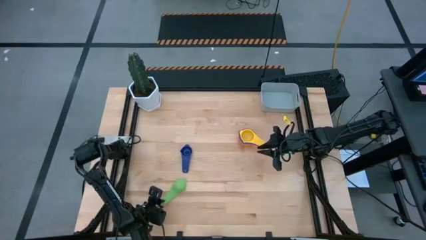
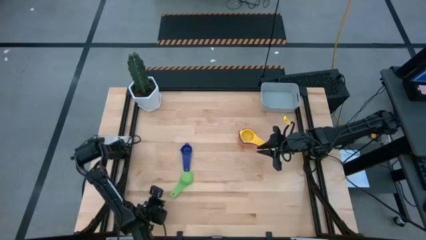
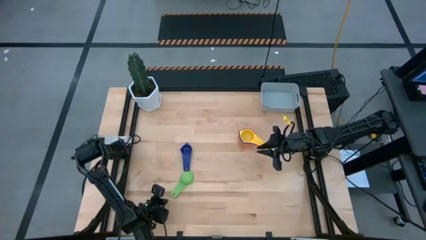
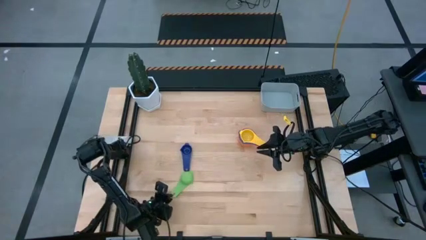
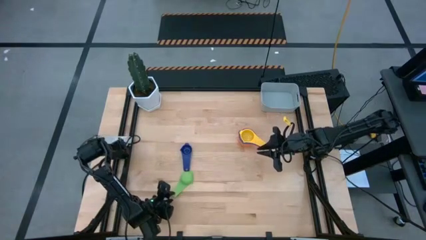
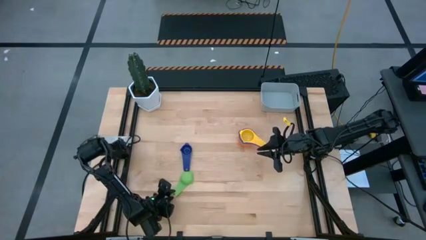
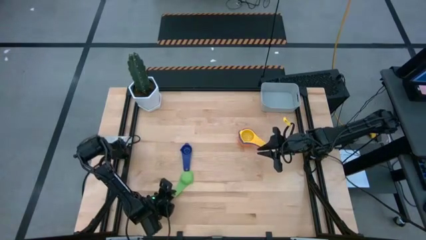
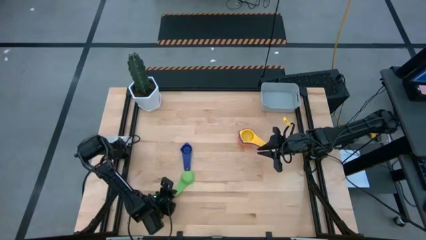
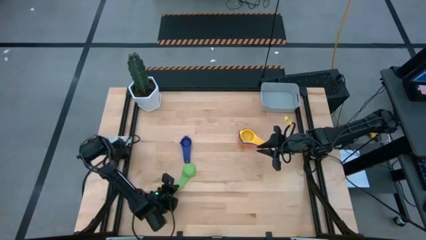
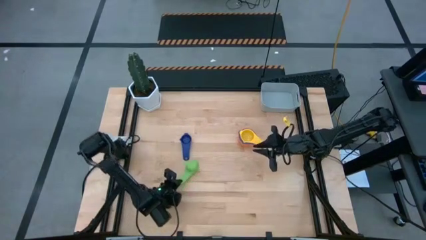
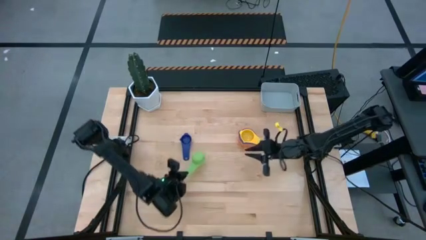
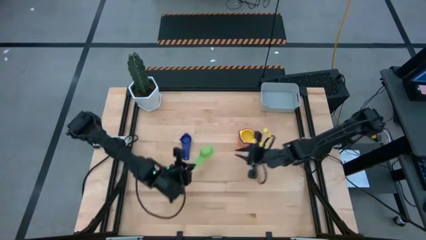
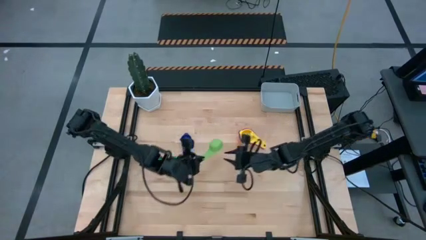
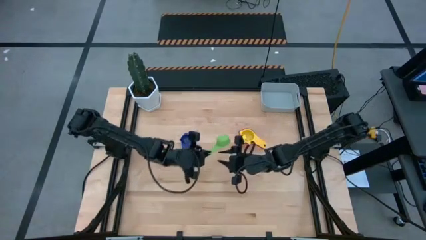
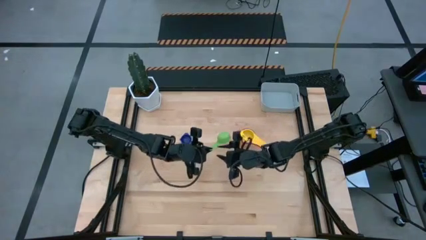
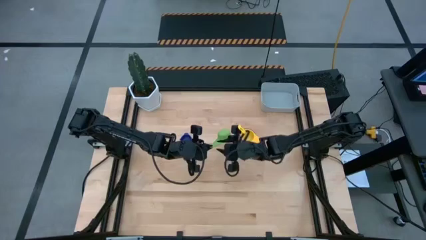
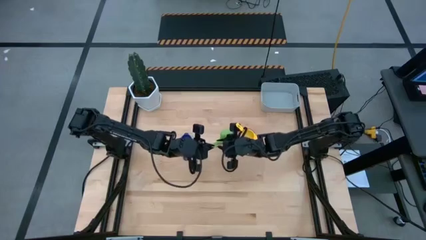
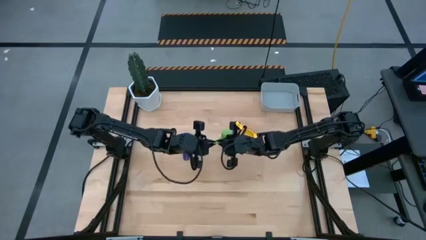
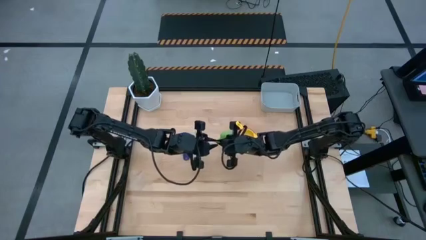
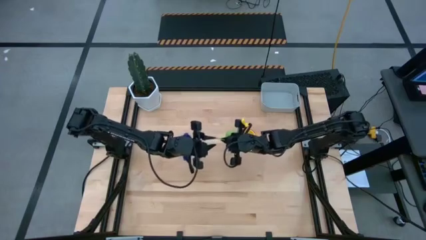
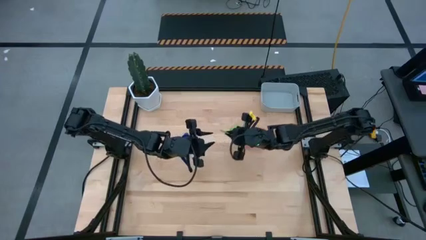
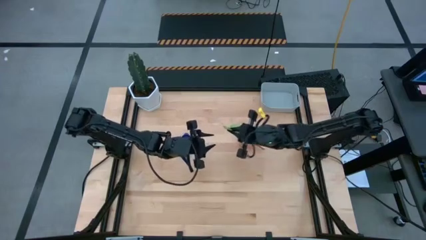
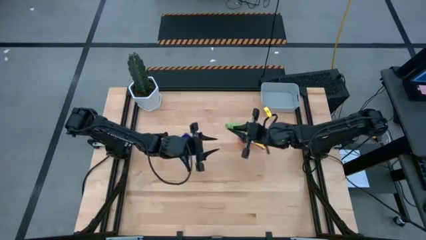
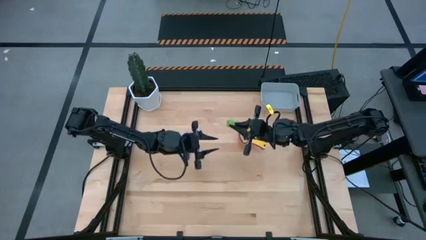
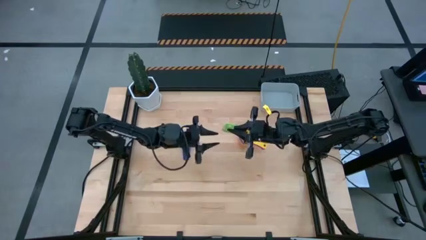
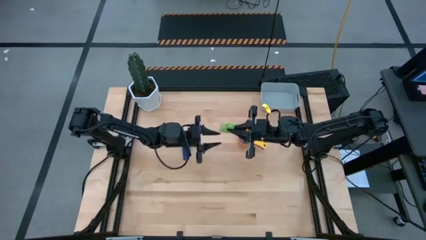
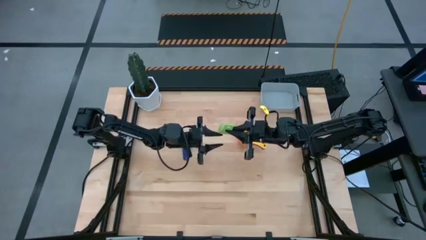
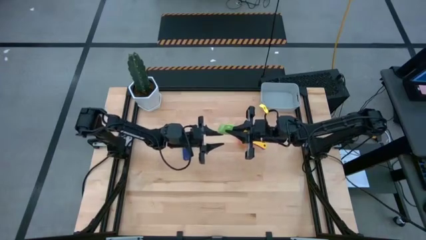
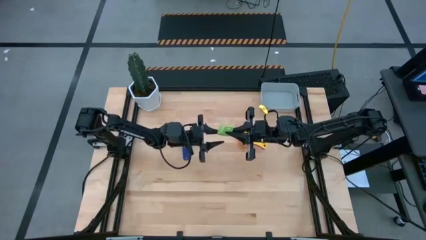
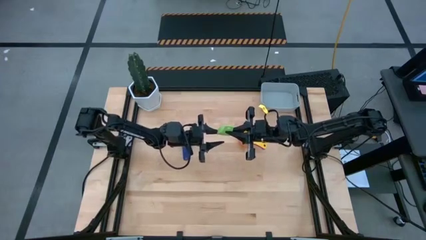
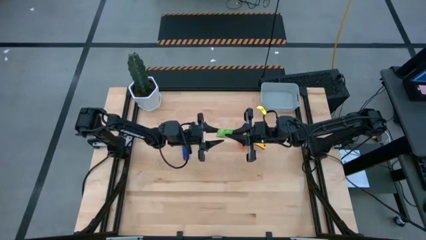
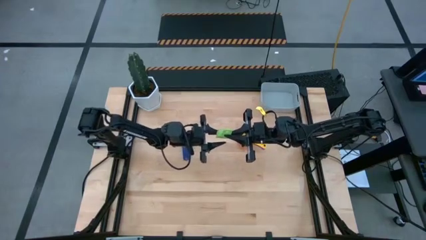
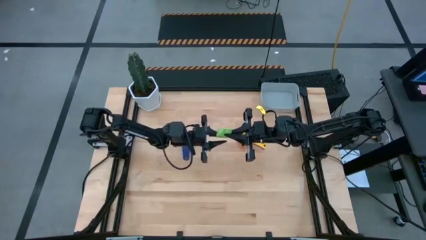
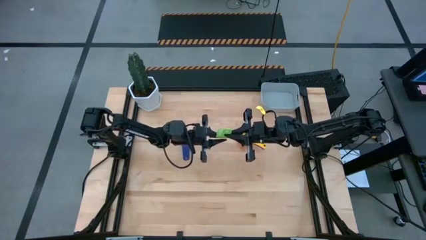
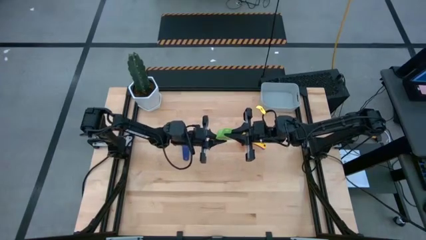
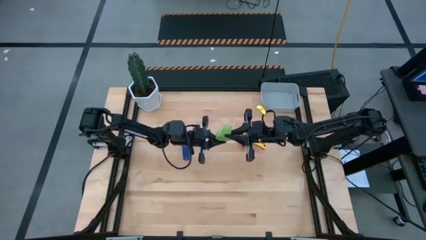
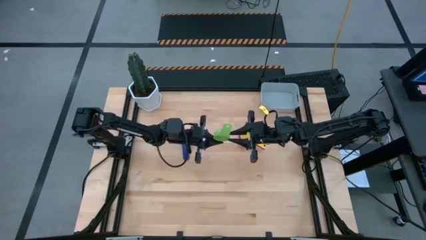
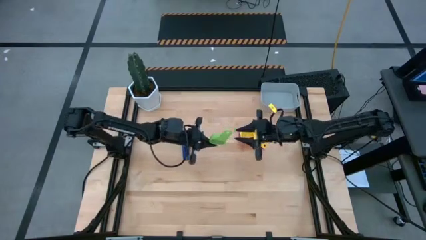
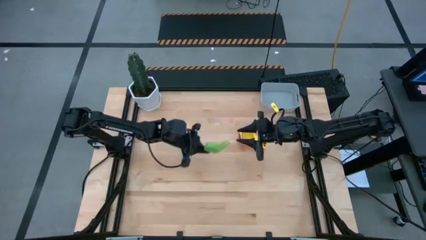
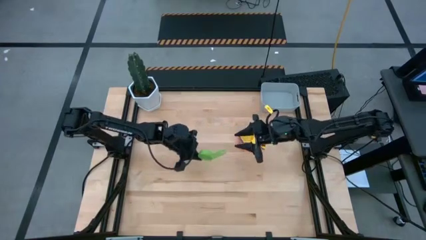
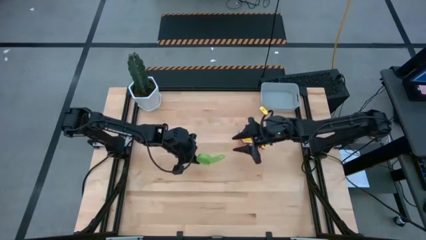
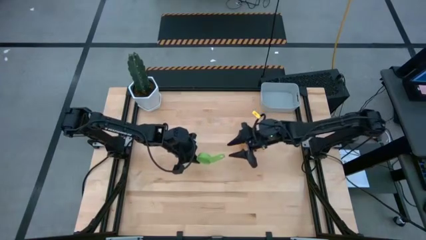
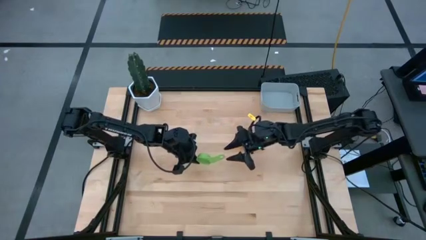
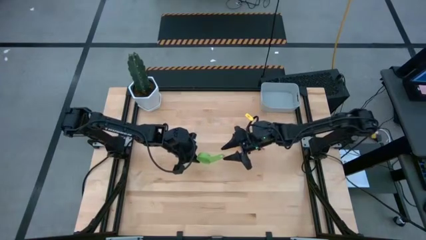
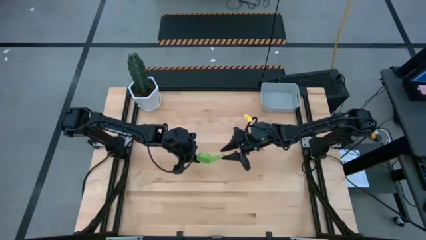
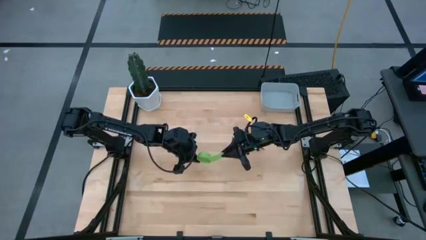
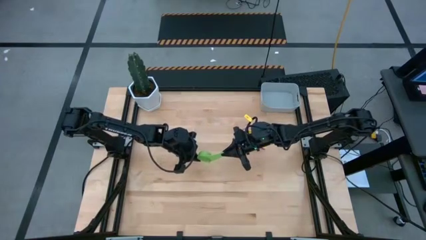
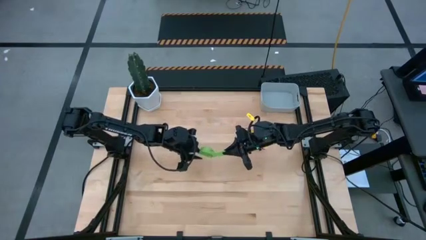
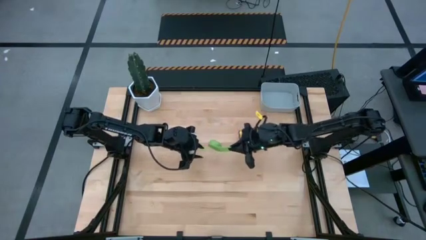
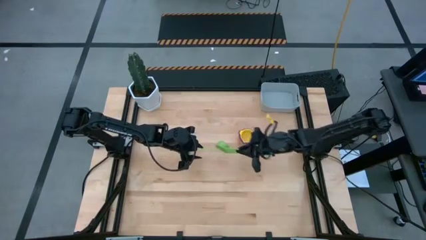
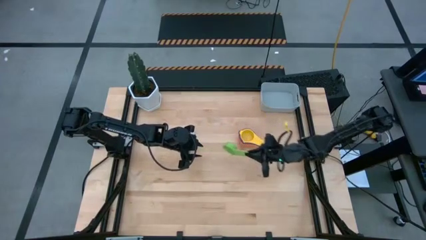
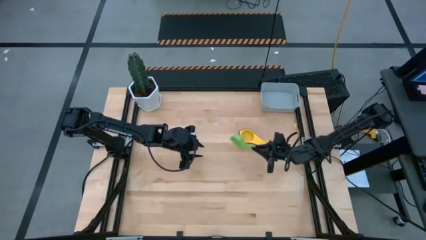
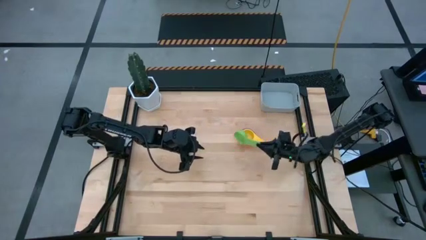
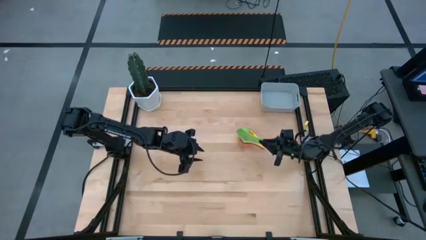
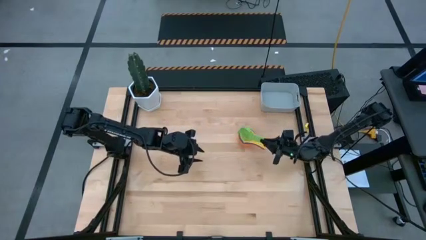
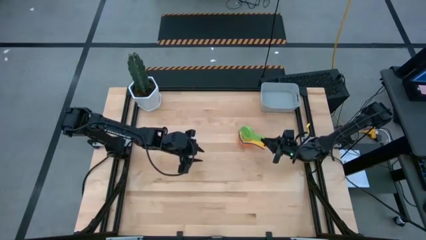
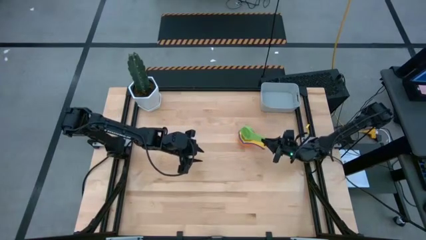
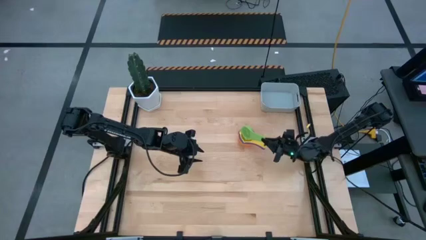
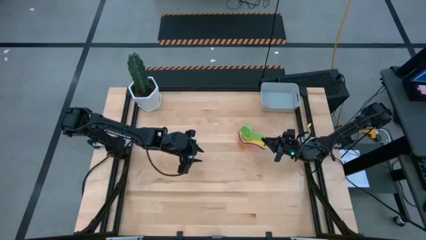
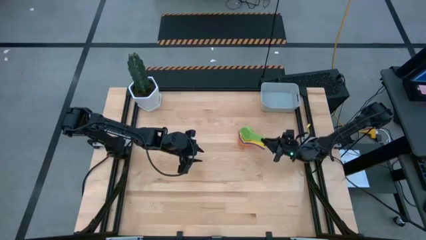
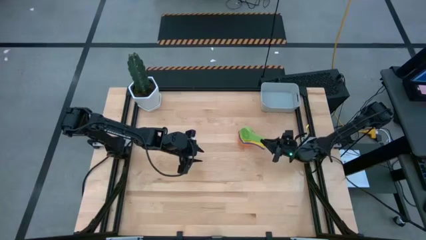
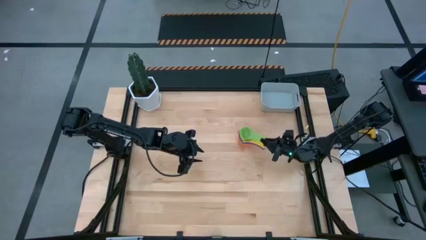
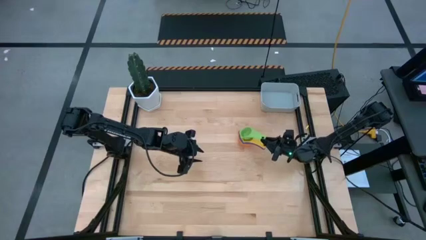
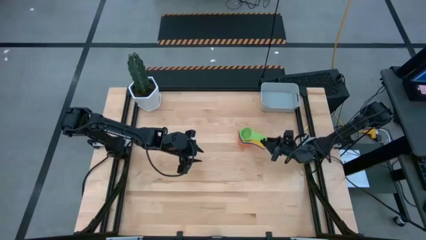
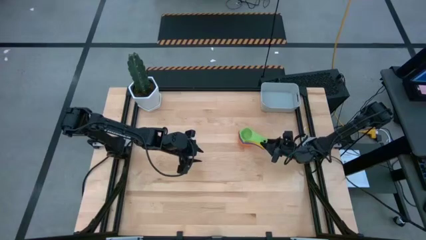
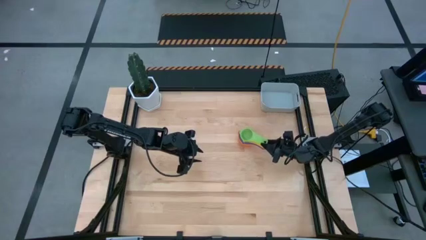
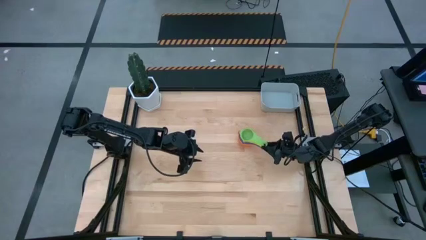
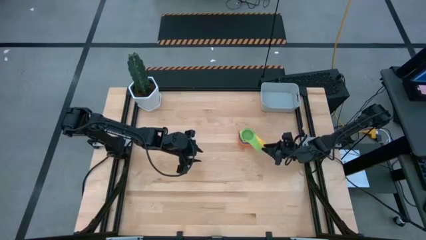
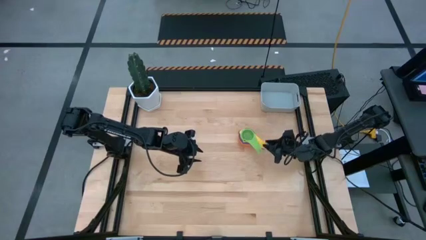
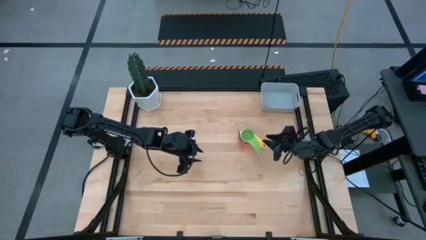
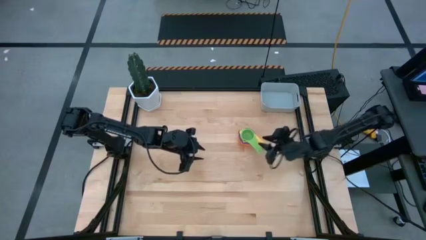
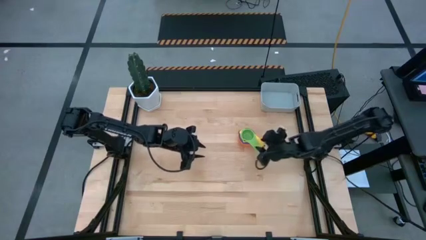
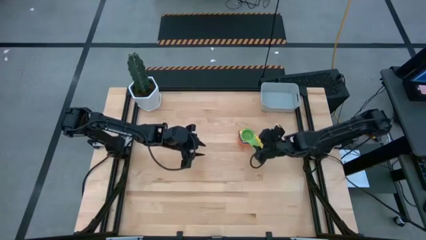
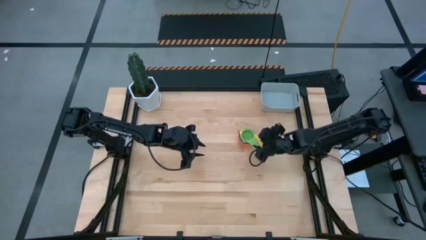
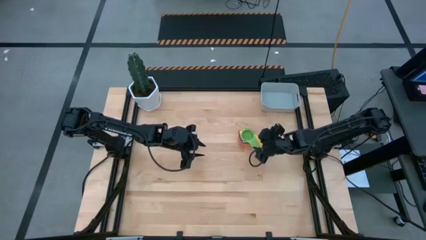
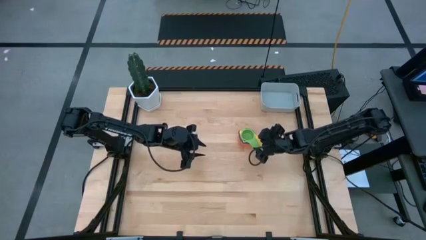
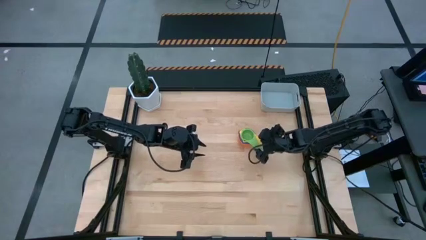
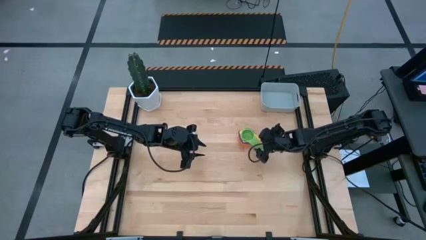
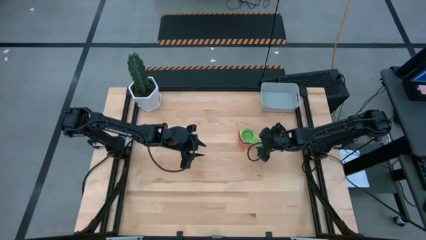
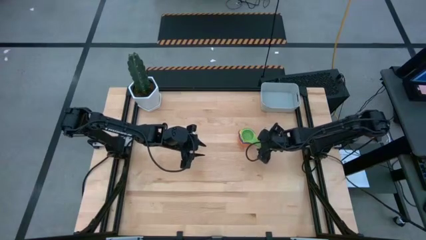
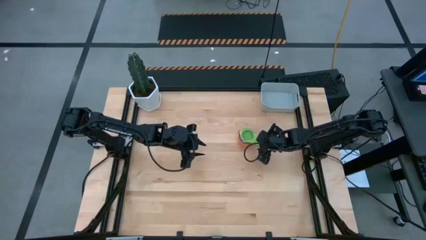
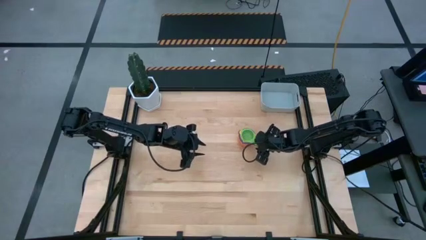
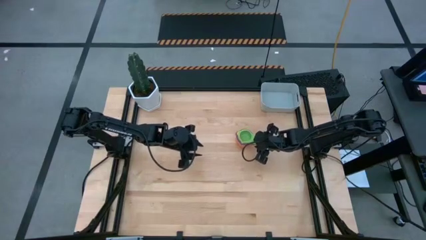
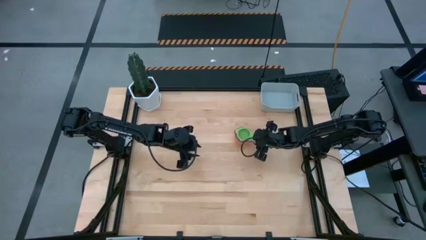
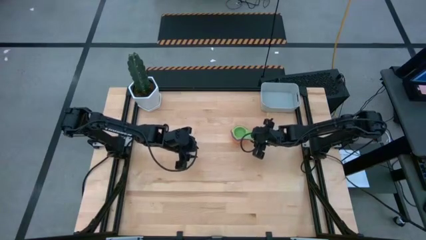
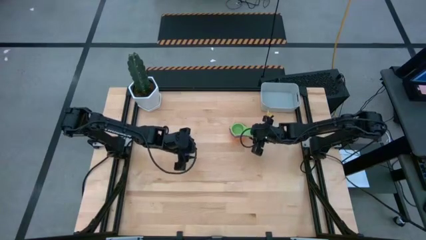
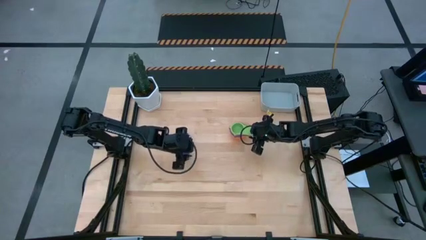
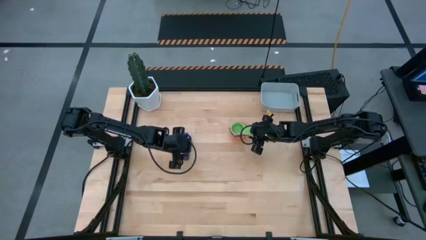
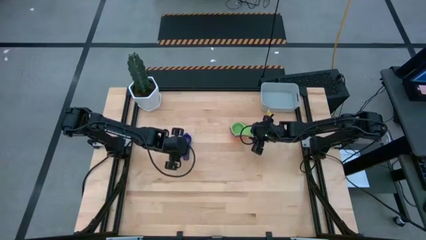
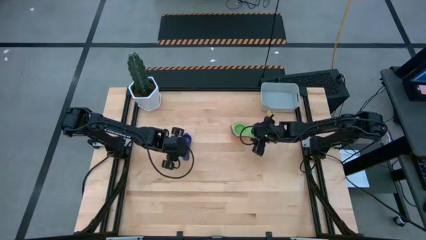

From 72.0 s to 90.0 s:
Task: Nest measuring cups in basket
Stack the green measuring cup on top of the yellow measuring cup
